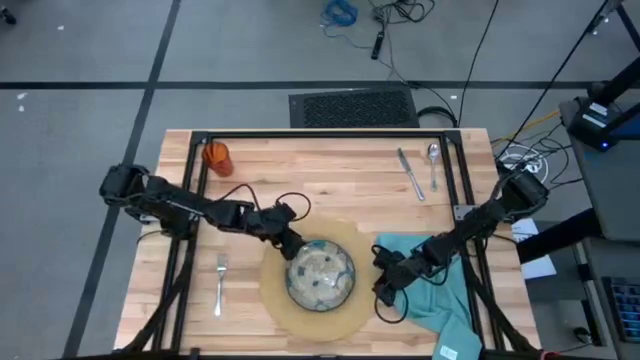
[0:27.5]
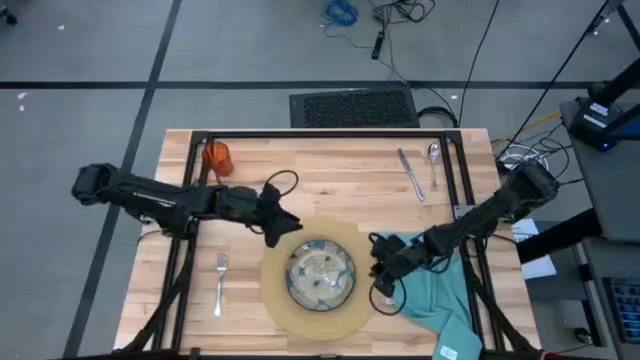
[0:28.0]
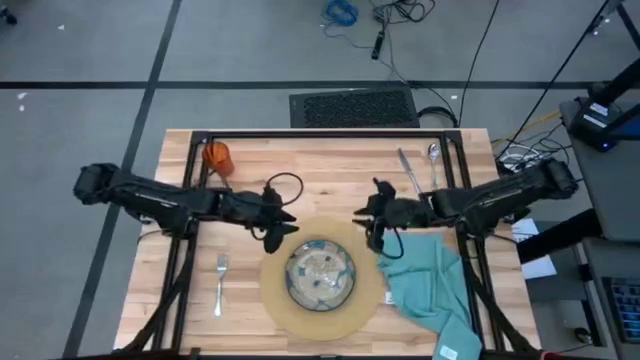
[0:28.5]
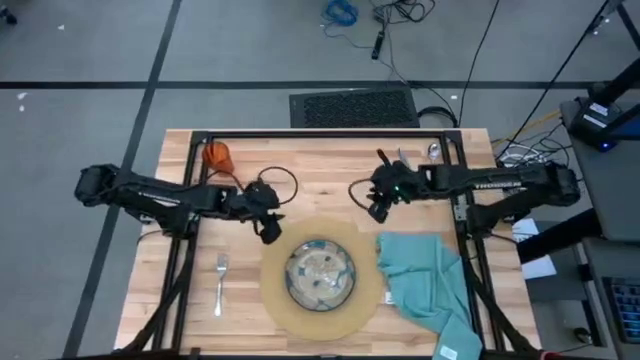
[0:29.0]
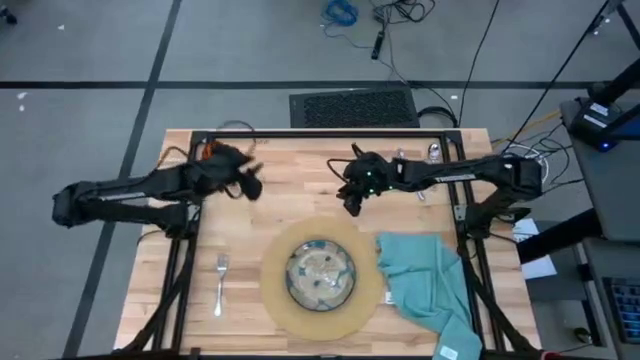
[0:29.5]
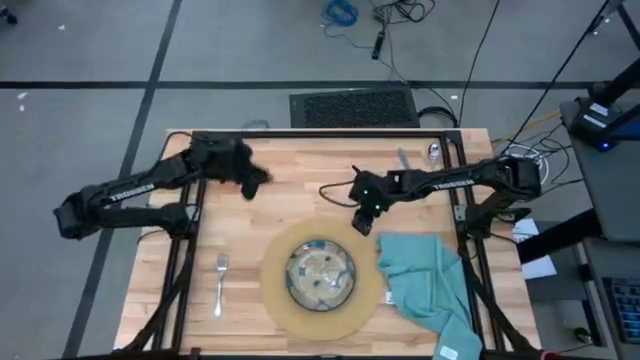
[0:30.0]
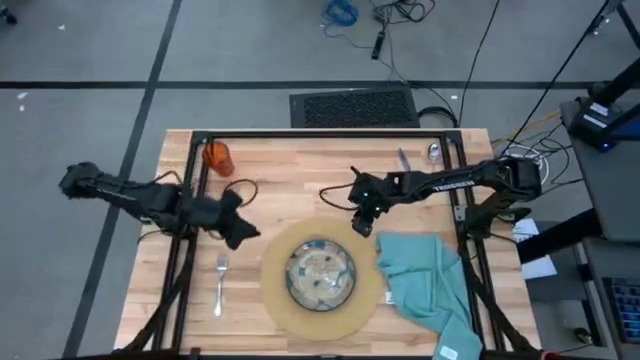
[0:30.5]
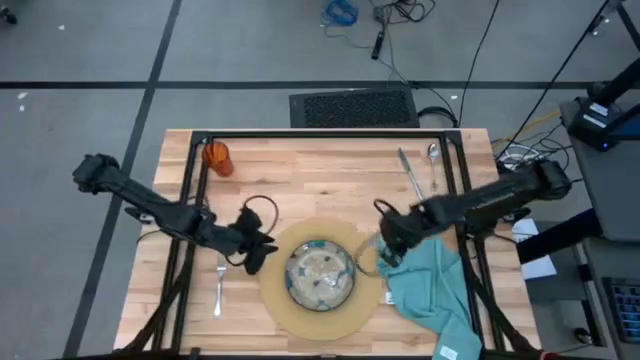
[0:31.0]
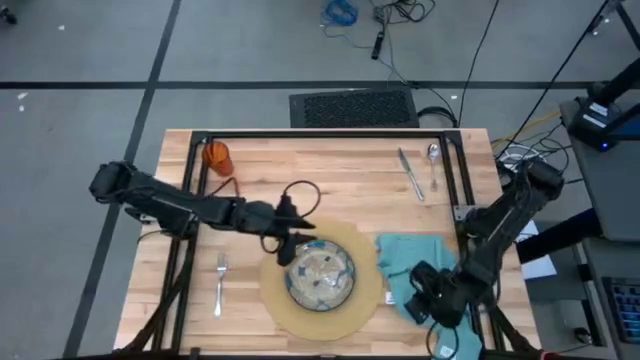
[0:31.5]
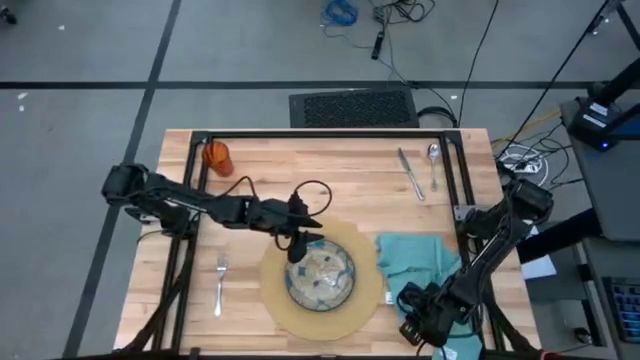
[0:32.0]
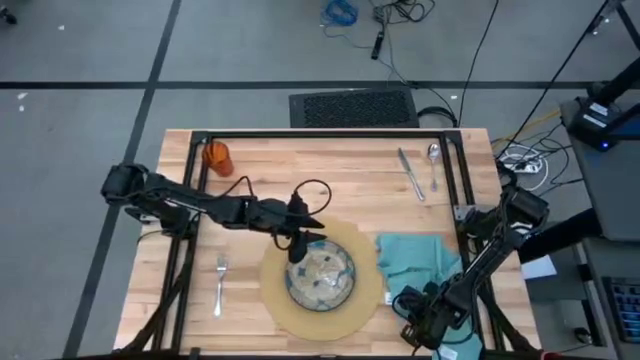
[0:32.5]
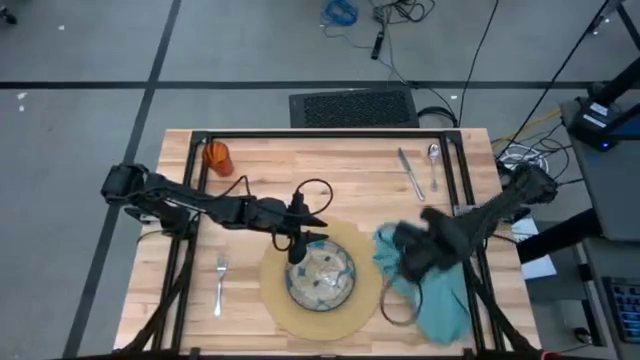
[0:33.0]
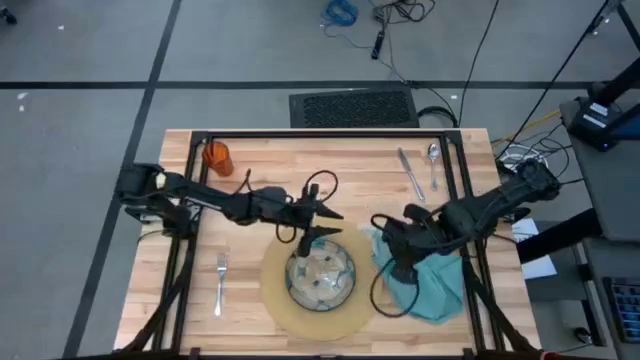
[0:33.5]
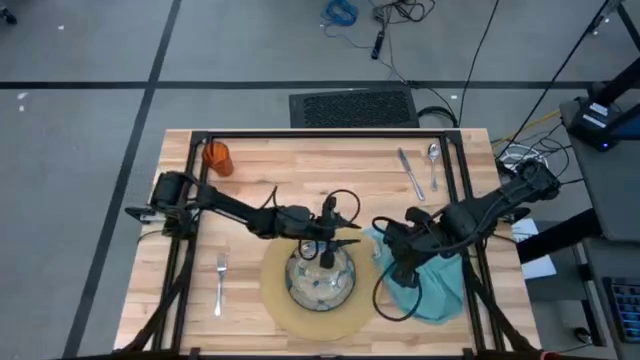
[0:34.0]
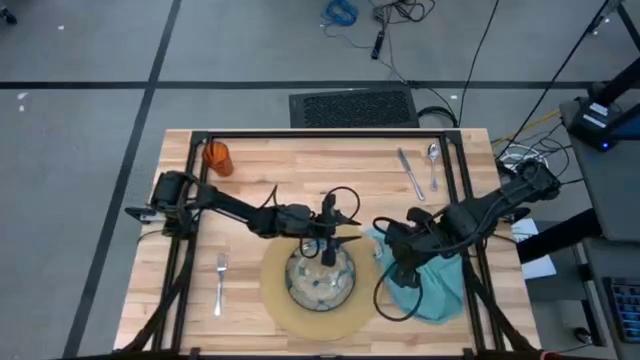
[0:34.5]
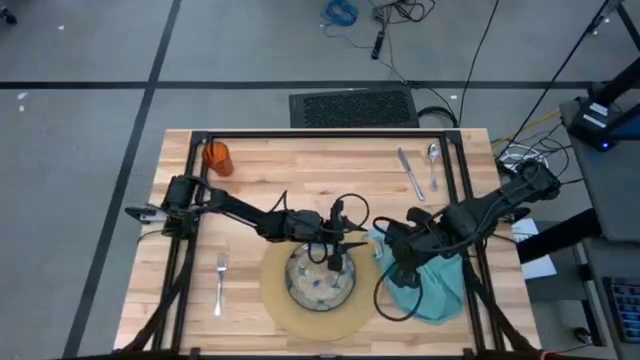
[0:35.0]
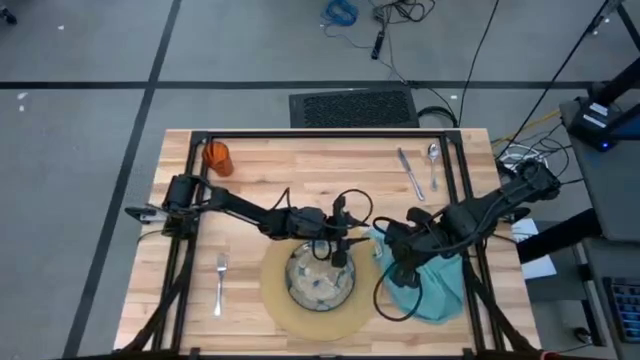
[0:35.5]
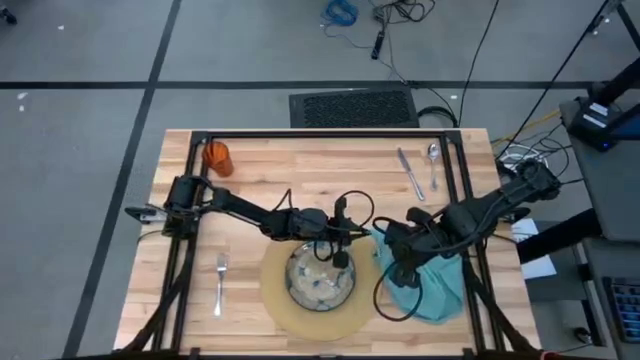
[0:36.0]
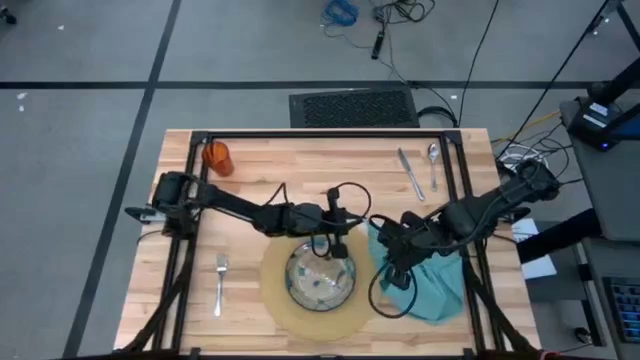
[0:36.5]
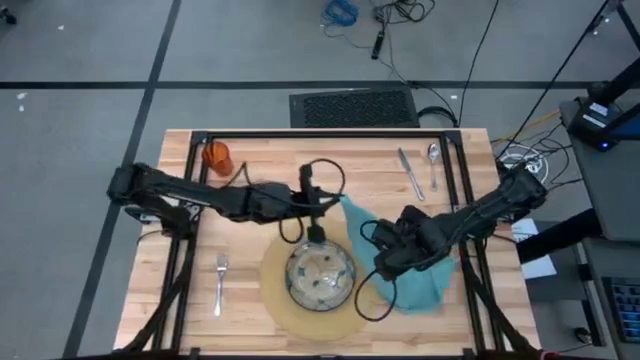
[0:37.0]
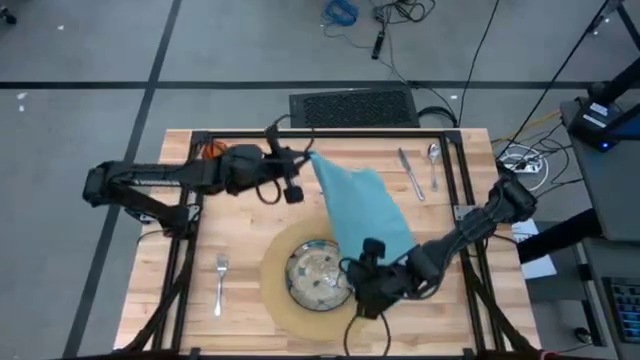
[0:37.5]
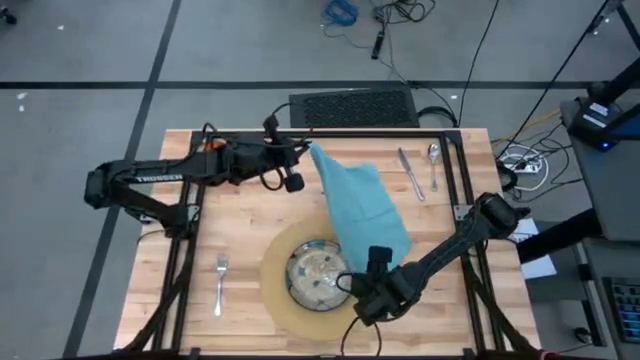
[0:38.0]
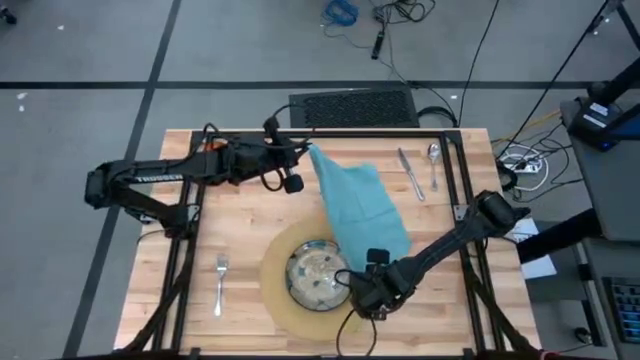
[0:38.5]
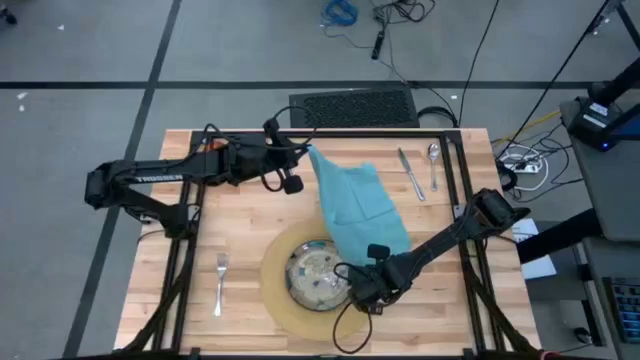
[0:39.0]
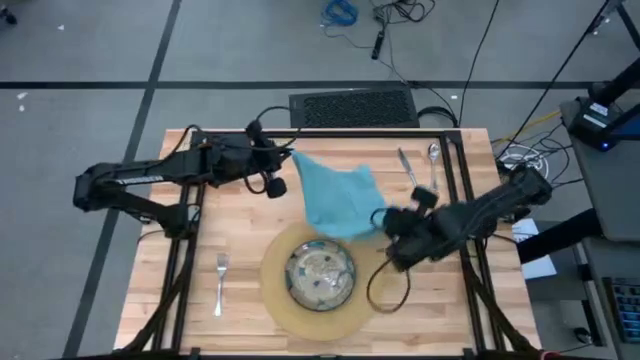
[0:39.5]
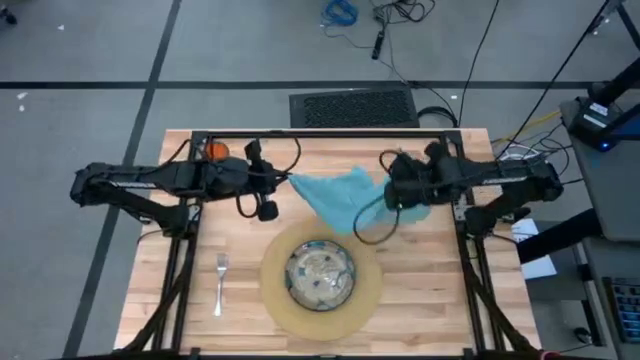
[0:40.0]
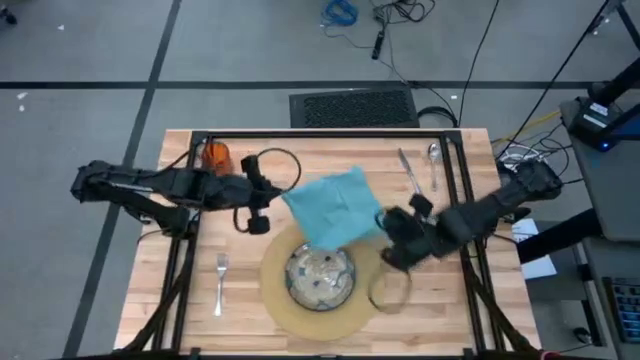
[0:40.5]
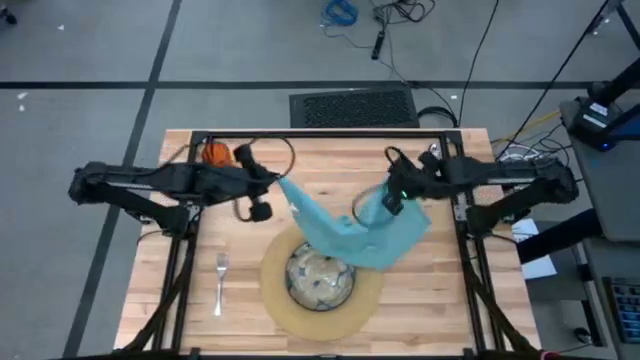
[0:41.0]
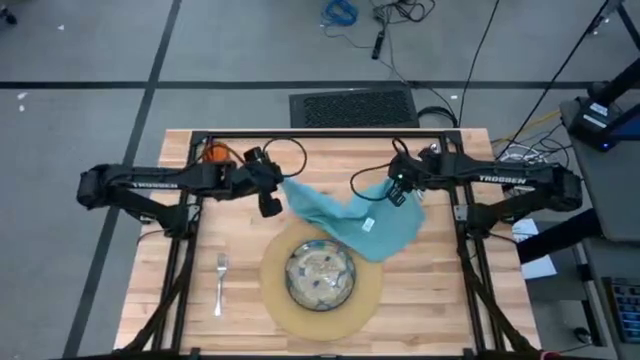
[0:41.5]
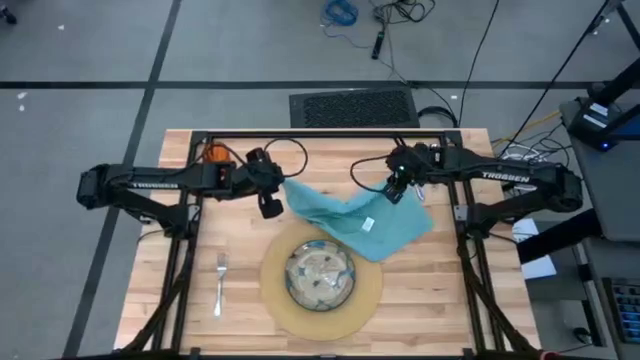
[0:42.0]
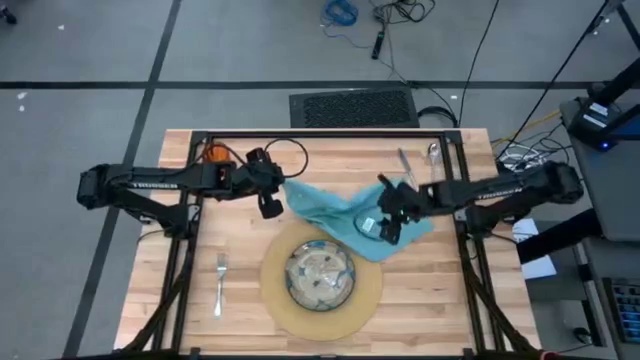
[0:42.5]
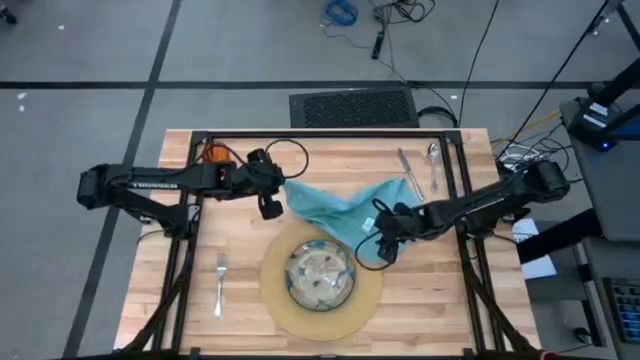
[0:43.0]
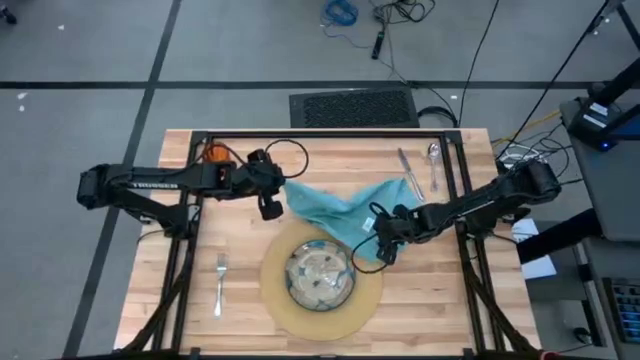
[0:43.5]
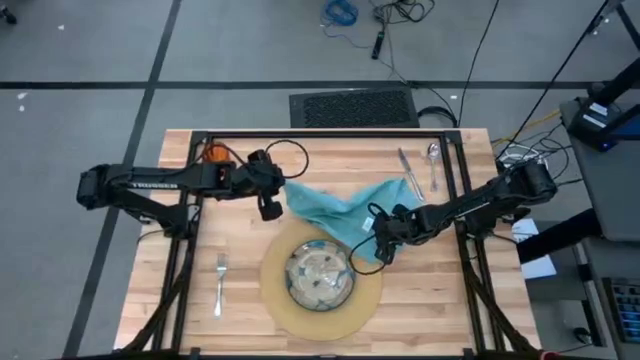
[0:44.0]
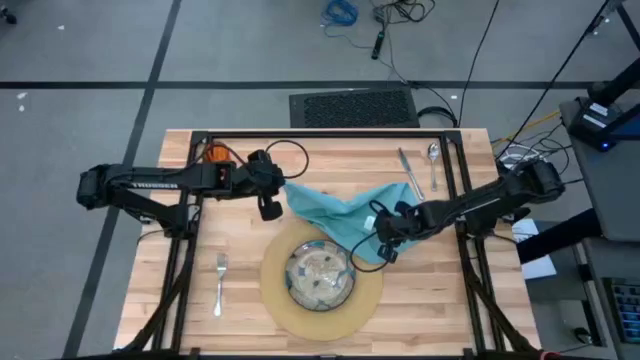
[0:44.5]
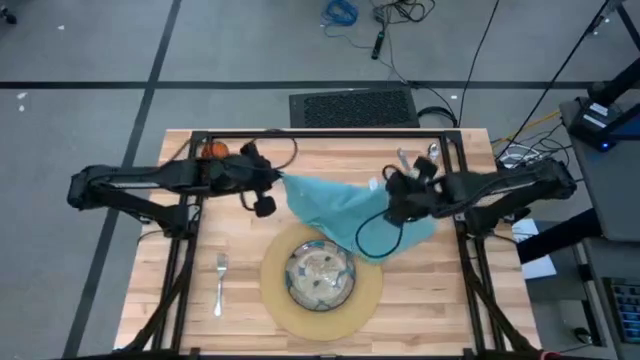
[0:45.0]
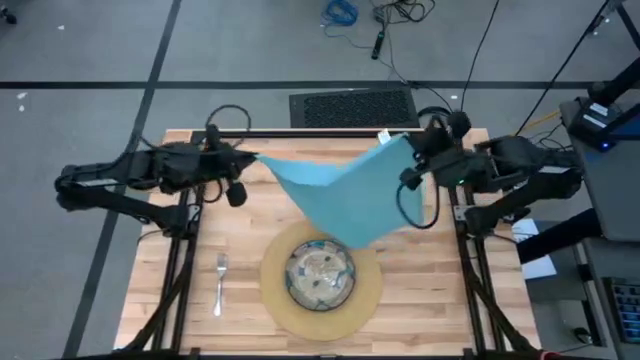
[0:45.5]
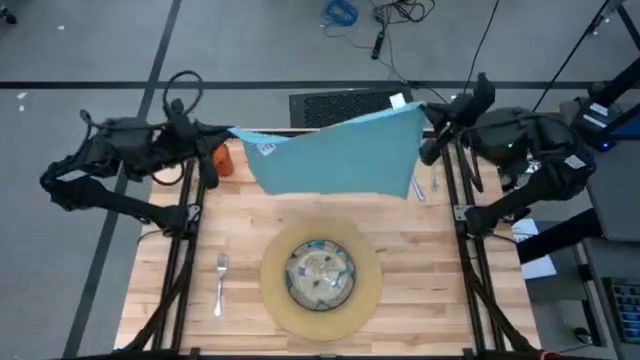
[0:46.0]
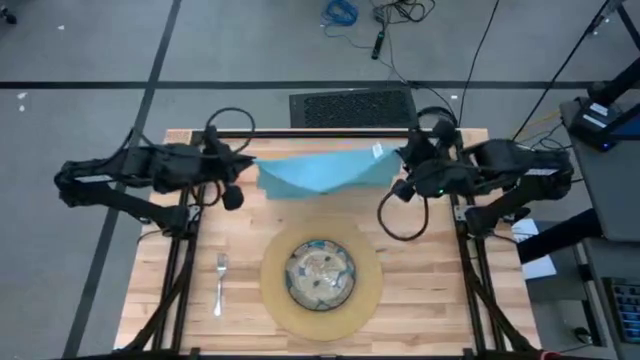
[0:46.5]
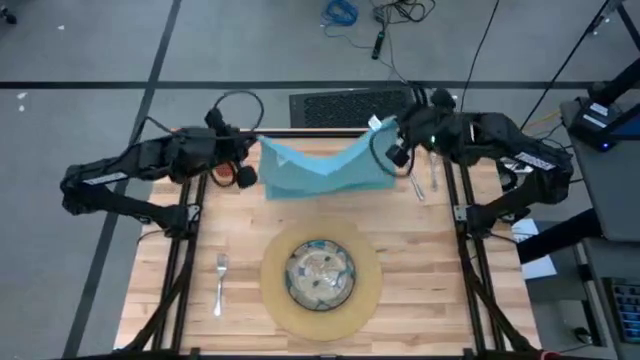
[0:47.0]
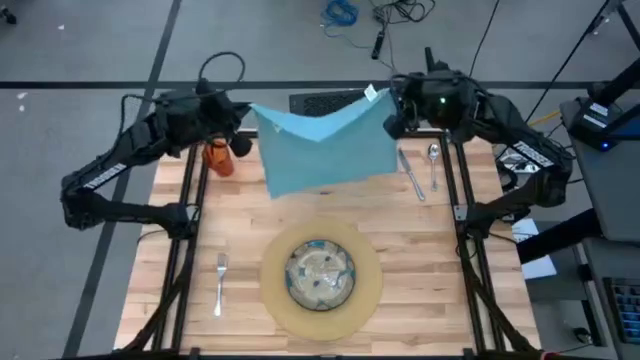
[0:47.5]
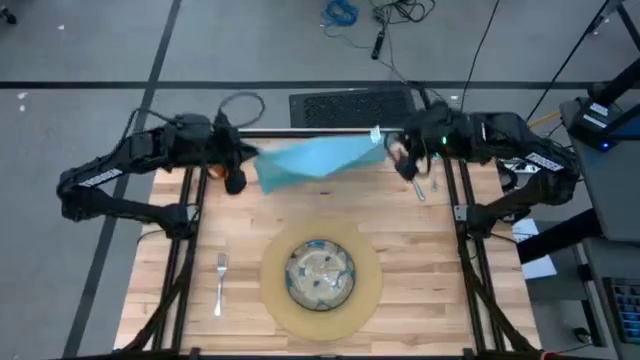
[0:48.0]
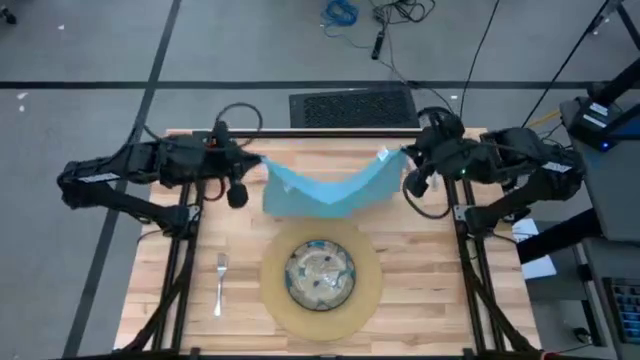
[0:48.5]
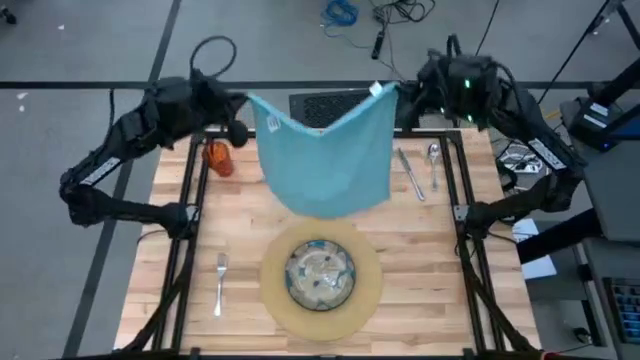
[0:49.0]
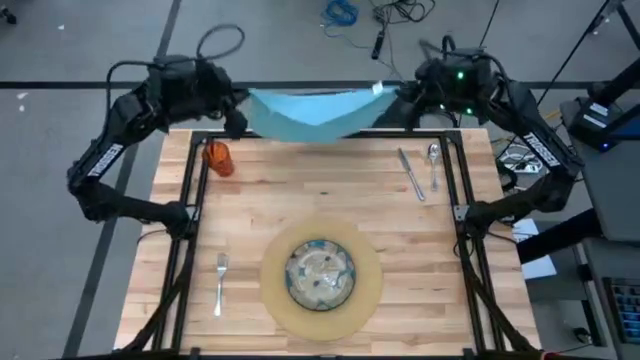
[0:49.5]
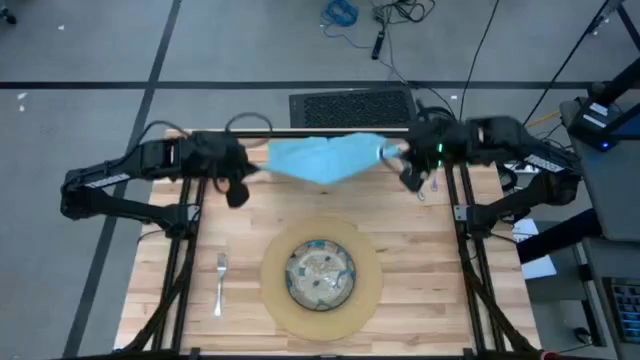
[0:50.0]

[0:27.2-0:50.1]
Task: Set table place
Fold the blue napkin
